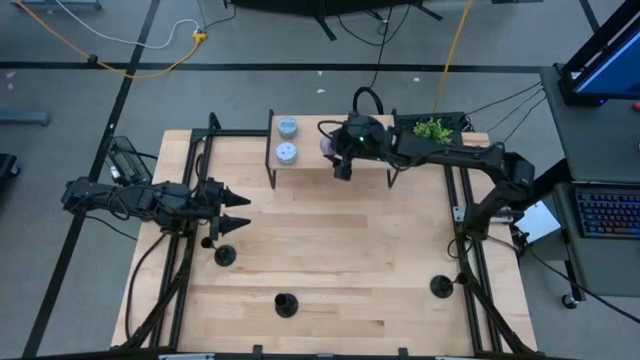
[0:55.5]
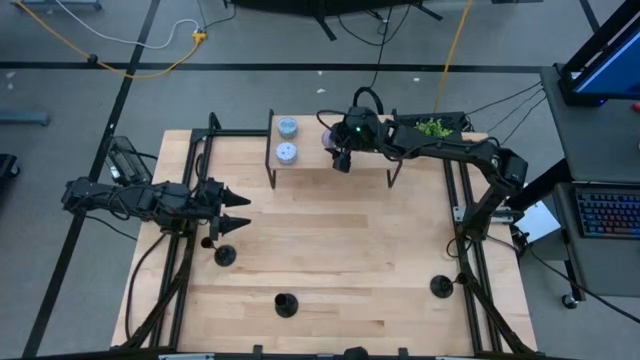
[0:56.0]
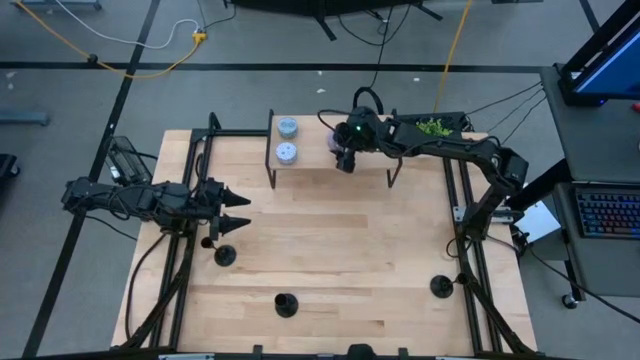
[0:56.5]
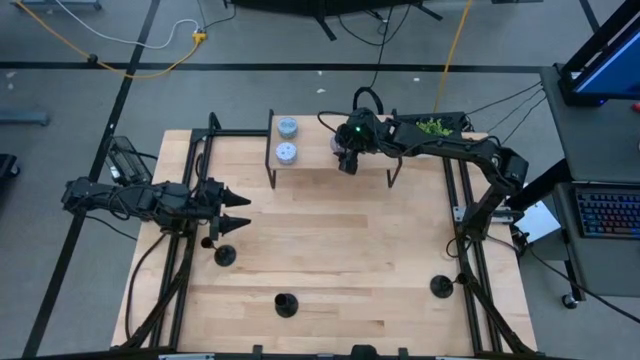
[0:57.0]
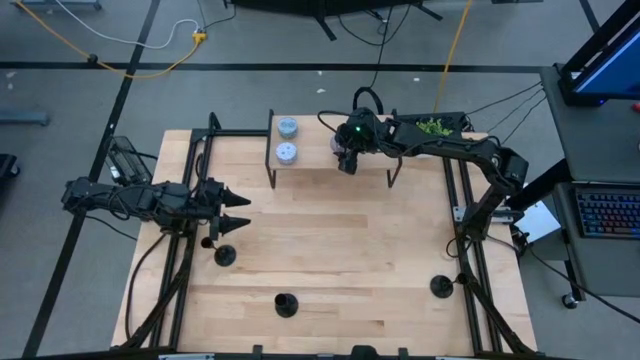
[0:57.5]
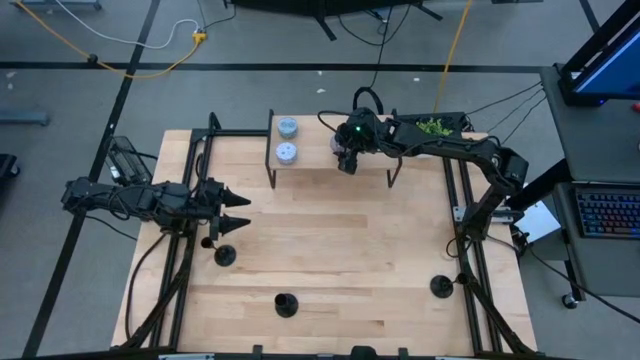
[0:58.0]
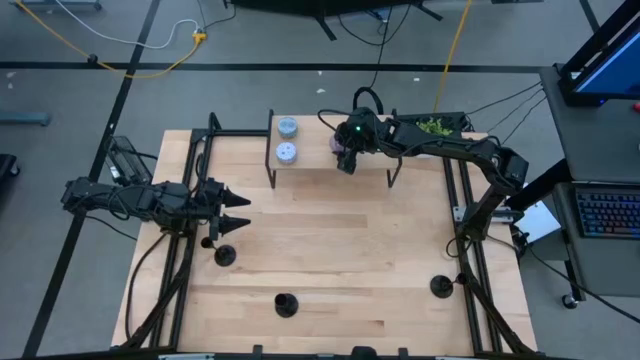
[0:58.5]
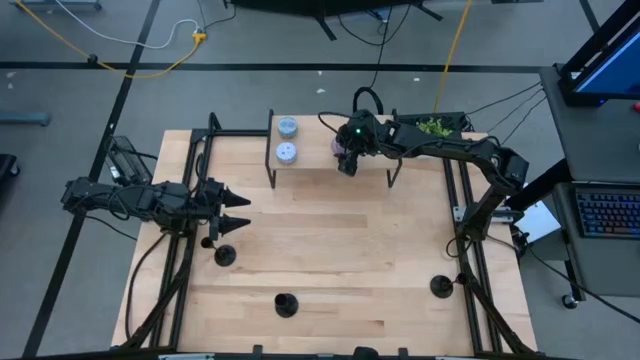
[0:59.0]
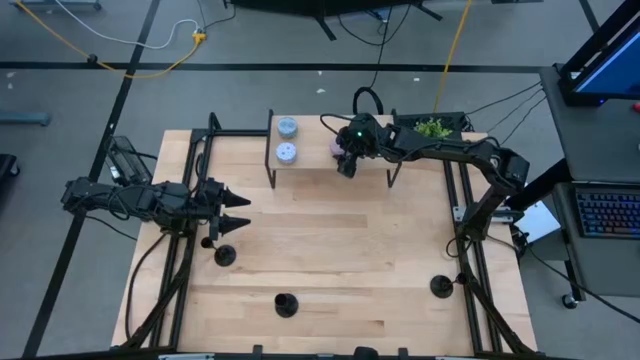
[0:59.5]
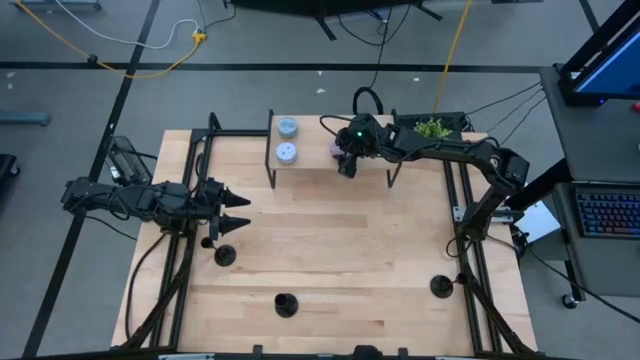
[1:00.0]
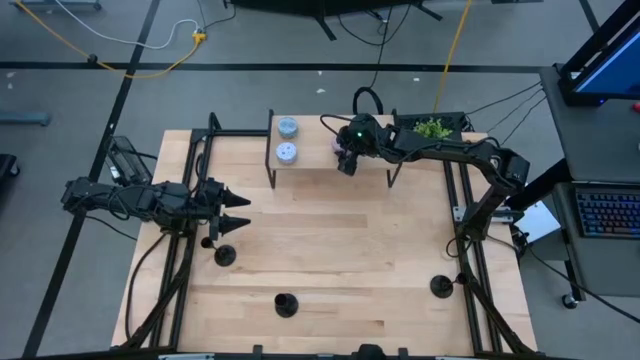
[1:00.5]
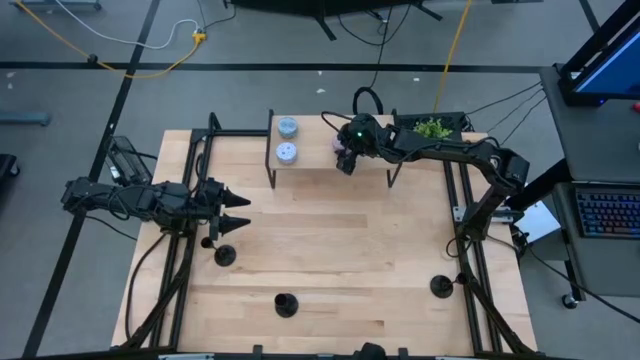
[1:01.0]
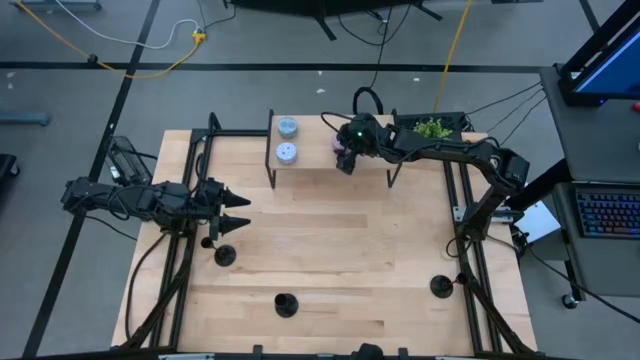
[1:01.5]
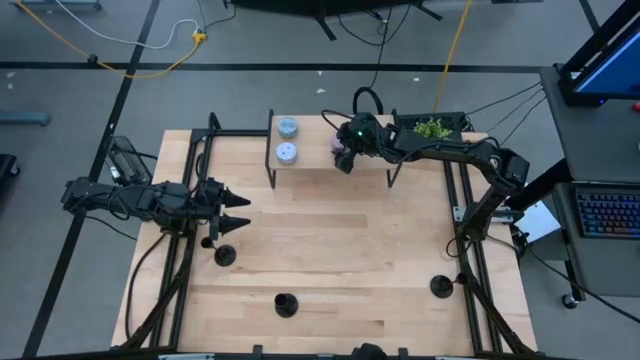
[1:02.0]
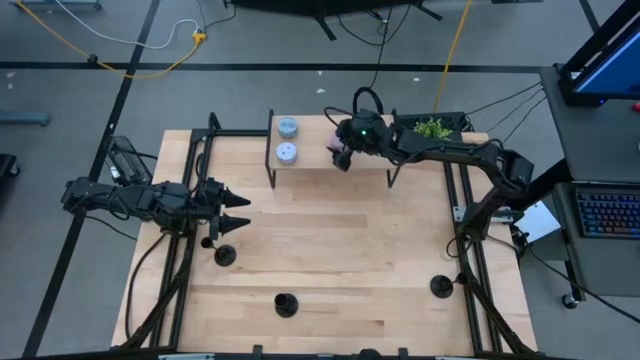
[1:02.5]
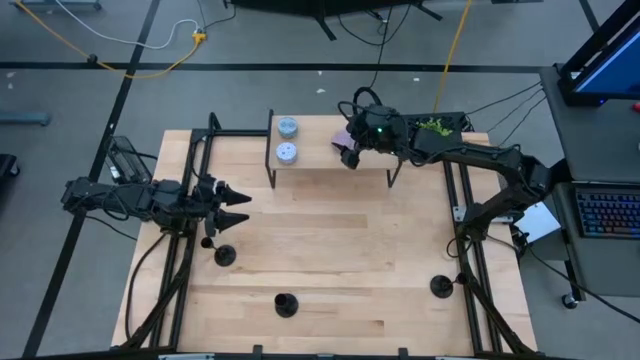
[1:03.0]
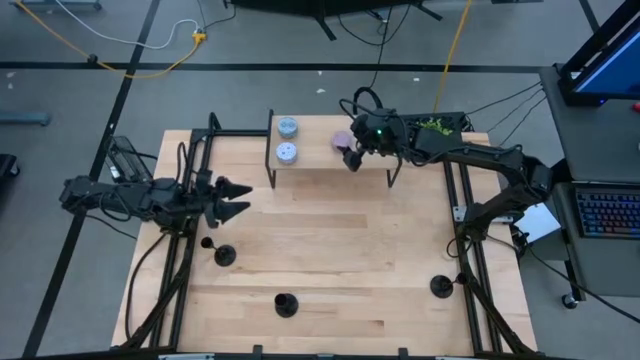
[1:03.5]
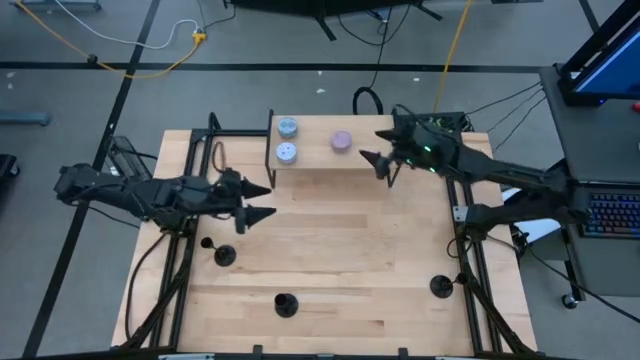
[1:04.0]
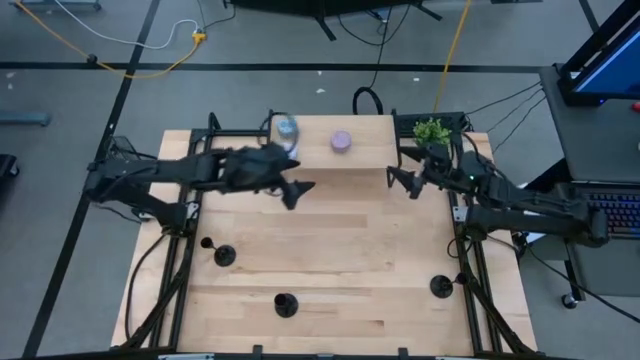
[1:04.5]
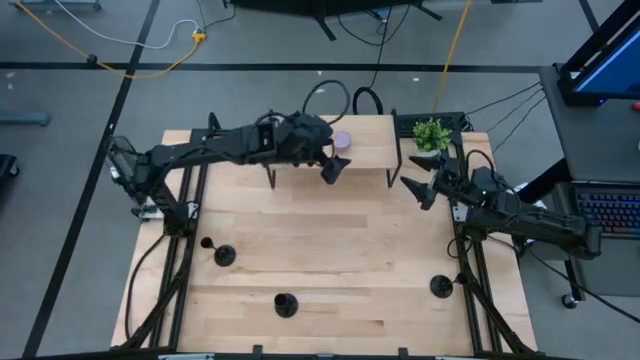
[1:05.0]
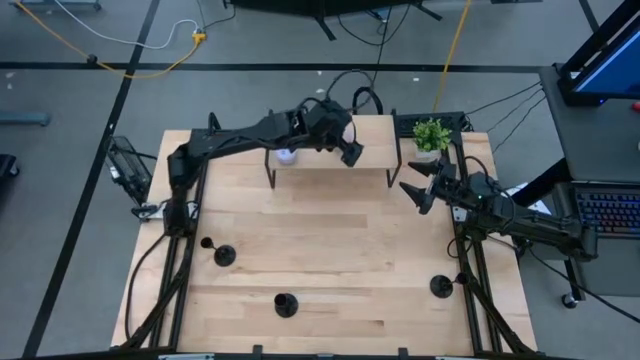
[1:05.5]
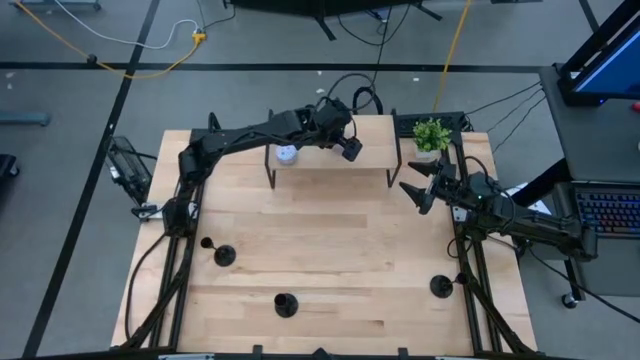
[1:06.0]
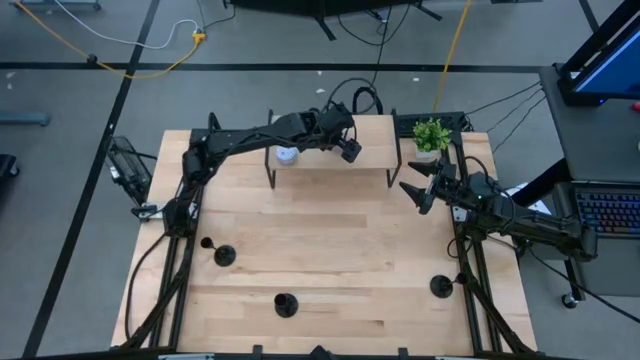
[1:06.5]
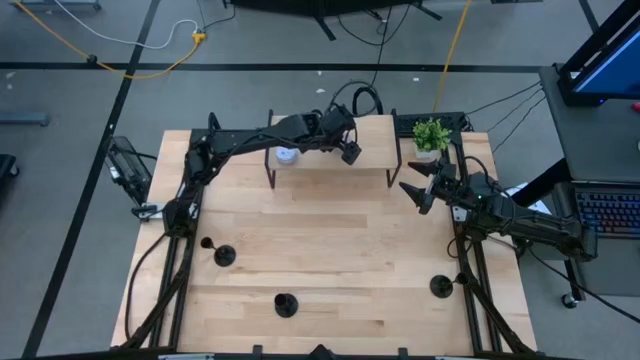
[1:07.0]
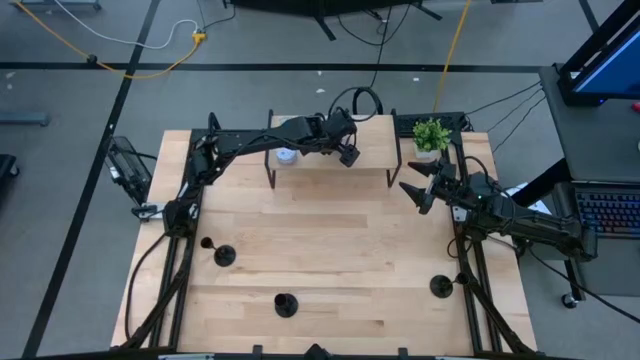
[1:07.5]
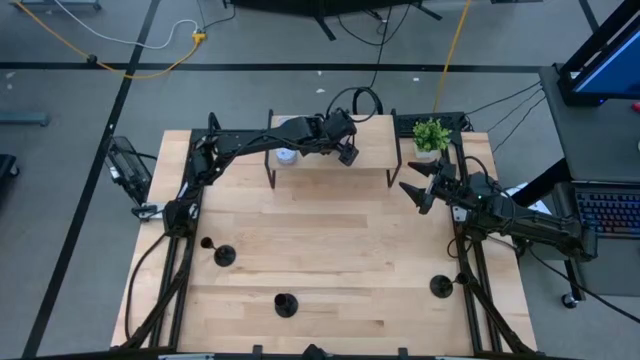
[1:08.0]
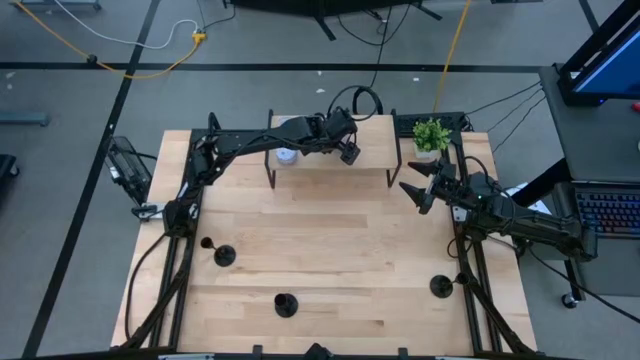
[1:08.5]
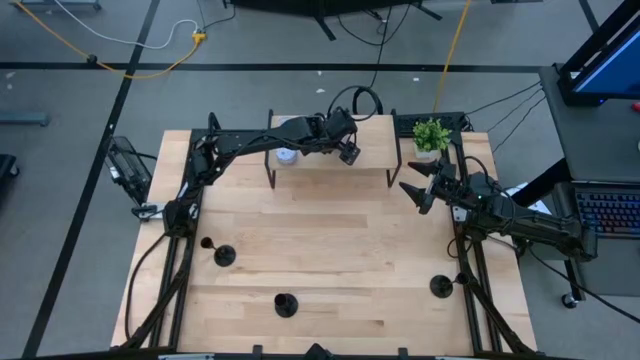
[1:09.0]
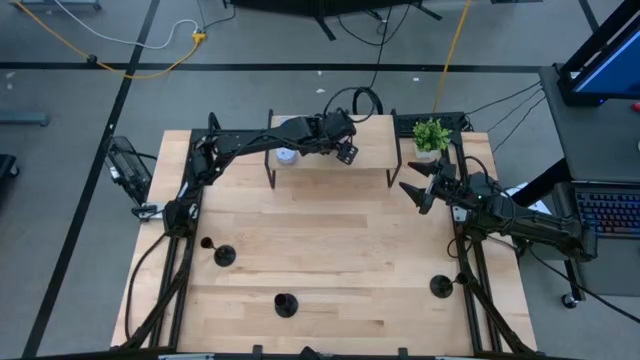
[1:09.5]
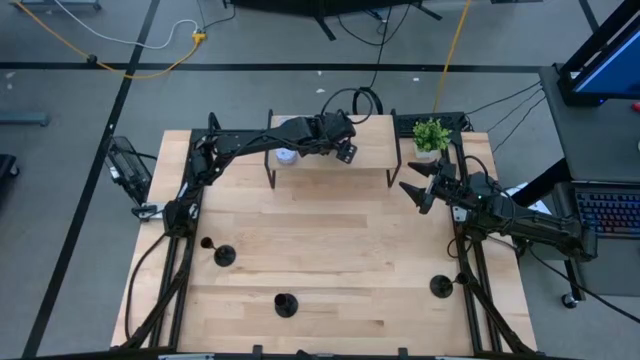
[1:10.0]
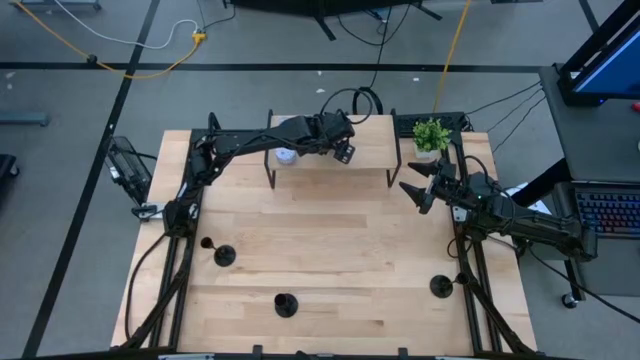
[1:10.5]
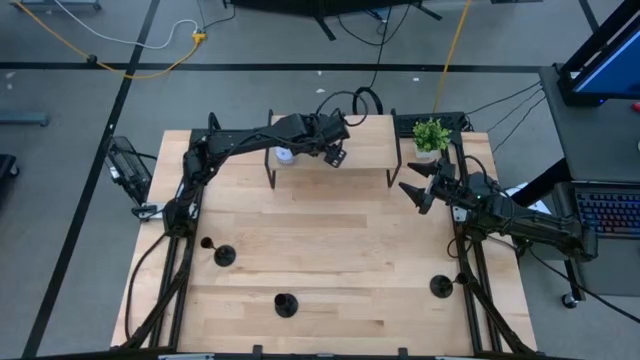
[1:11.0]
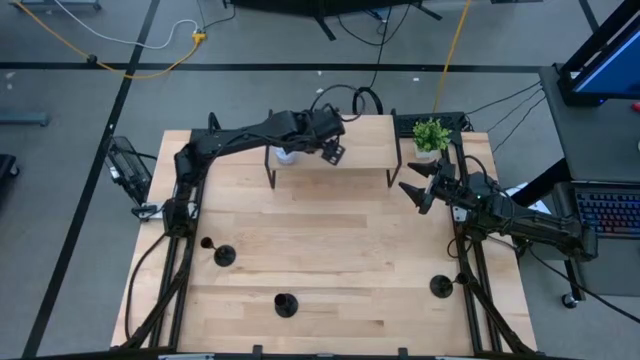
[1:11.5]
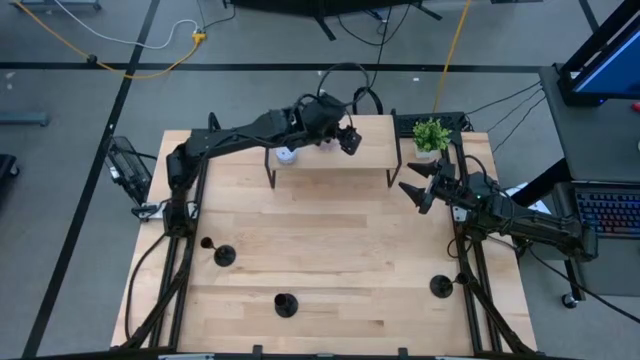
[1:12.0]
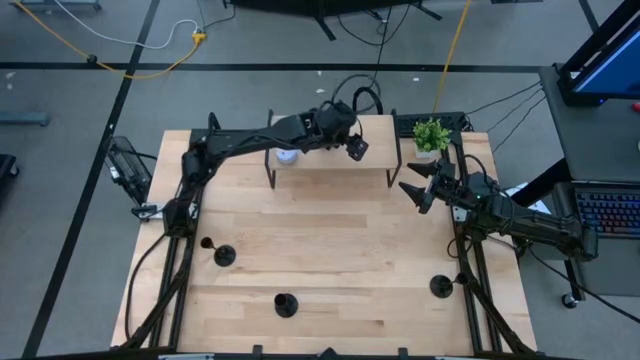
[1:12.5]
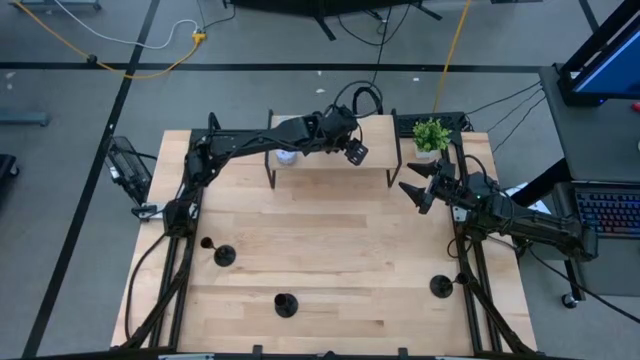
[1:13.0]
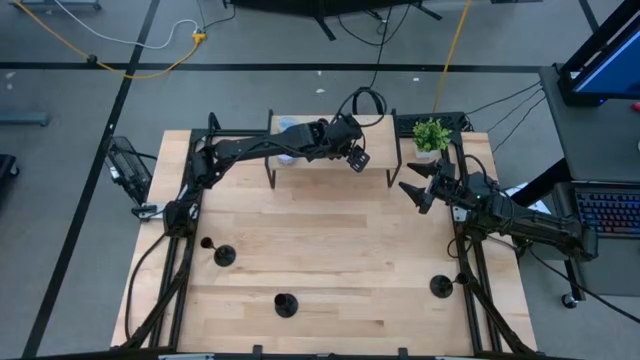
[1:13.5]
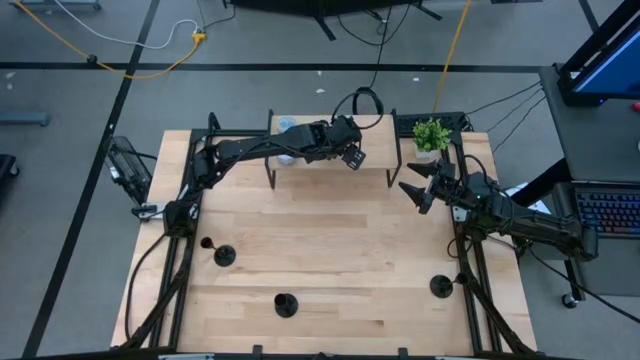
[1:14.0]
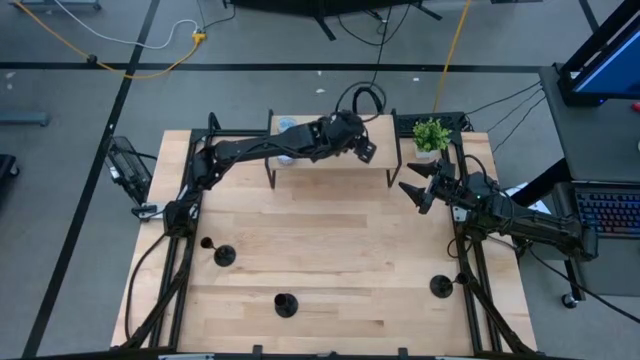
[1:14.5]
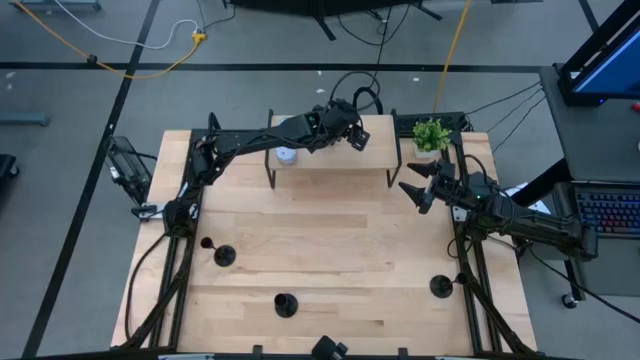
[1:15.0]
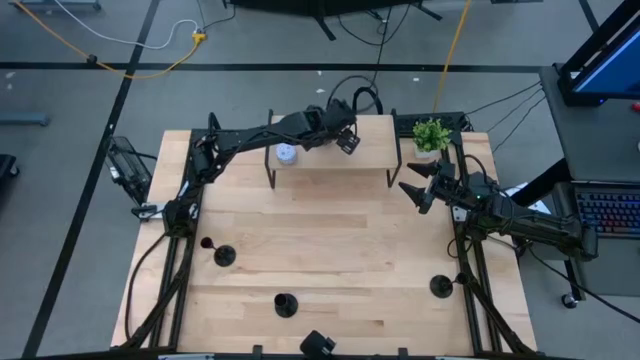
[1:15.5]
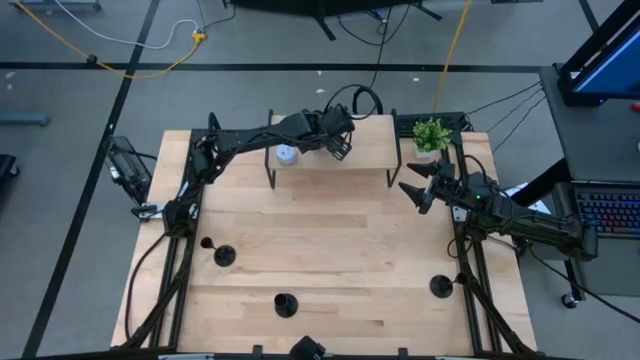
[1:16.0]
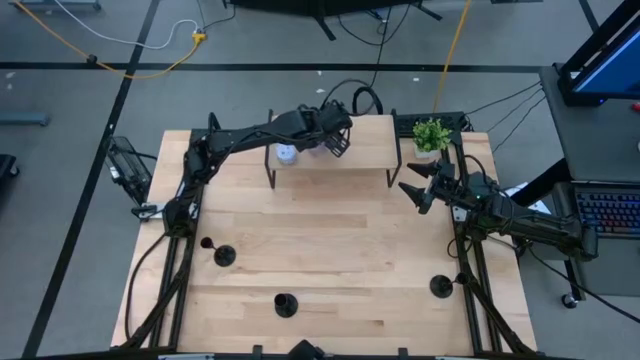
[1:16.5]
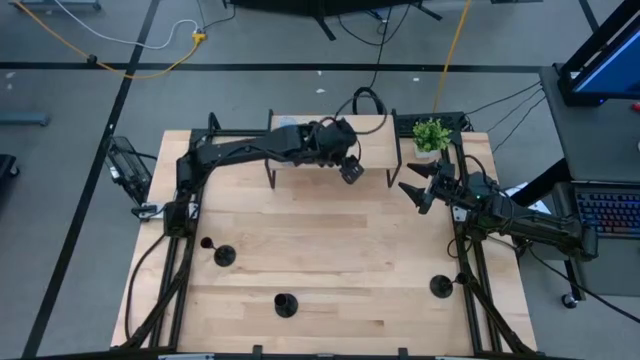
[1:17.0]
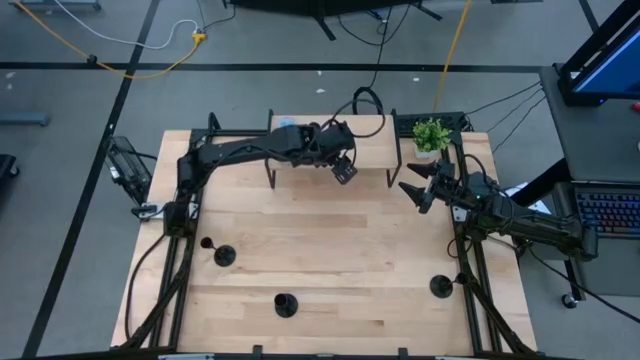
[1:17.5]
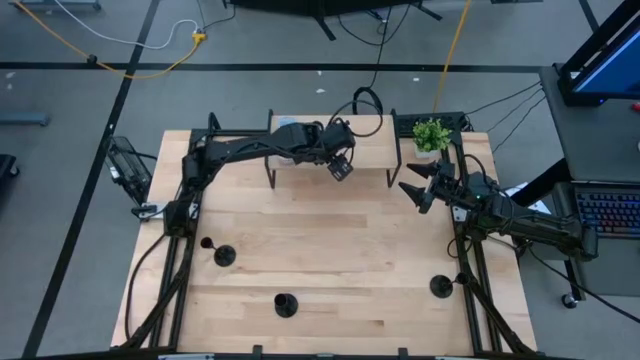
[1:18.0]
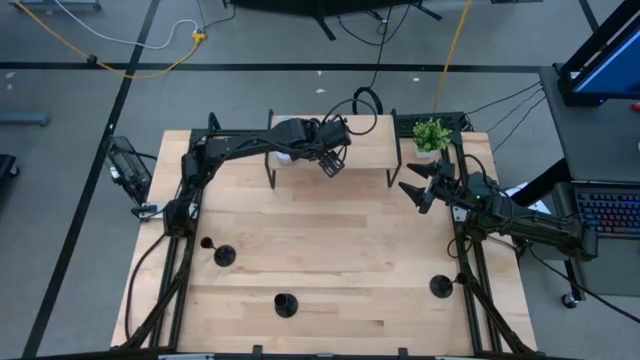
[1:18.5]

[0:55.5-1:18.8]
Task: Pick & Place candle stick holders
Put the pink scented candle on the shelf
